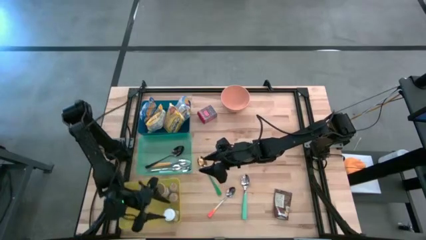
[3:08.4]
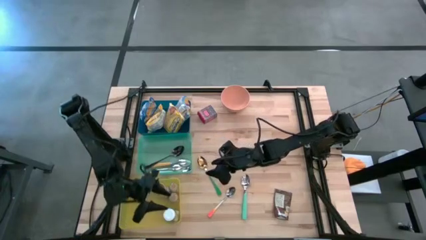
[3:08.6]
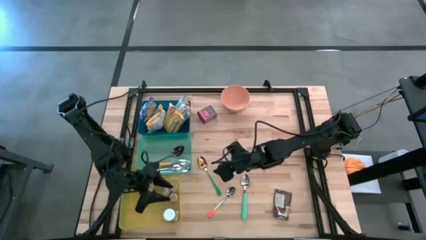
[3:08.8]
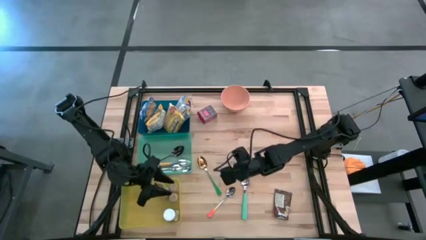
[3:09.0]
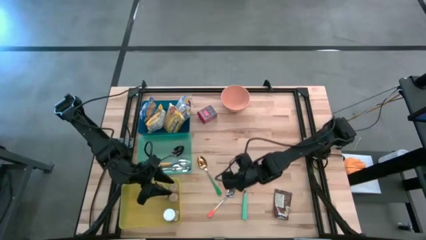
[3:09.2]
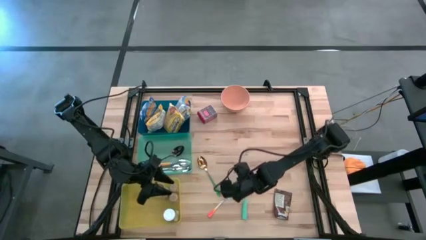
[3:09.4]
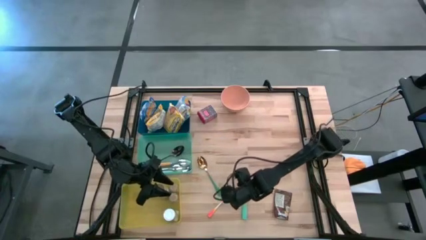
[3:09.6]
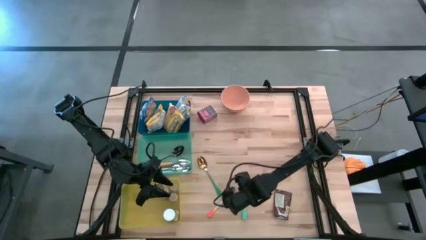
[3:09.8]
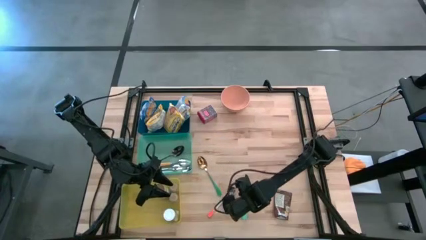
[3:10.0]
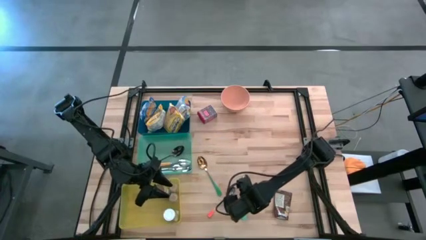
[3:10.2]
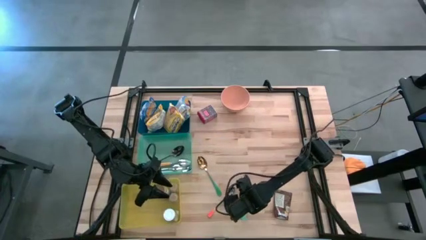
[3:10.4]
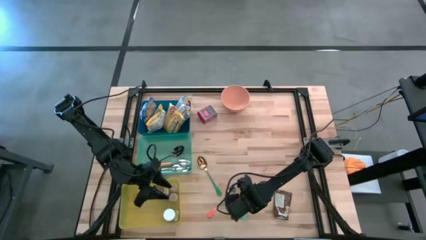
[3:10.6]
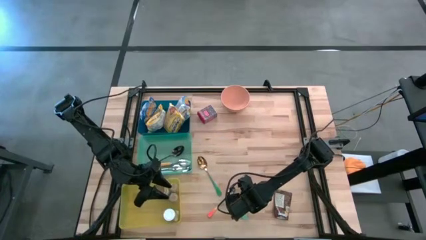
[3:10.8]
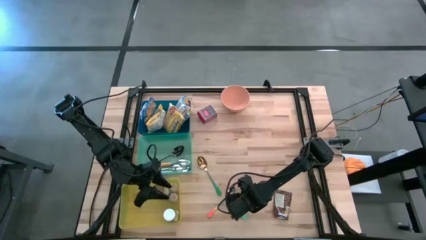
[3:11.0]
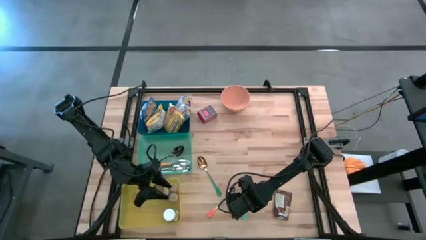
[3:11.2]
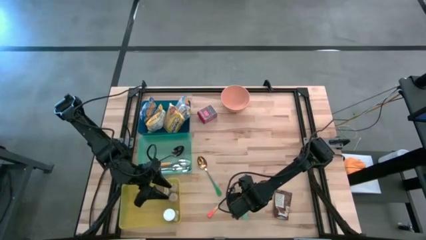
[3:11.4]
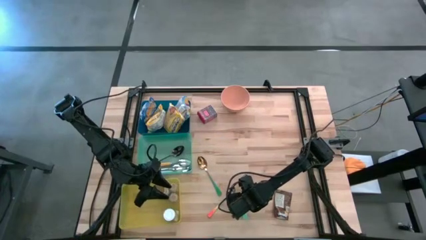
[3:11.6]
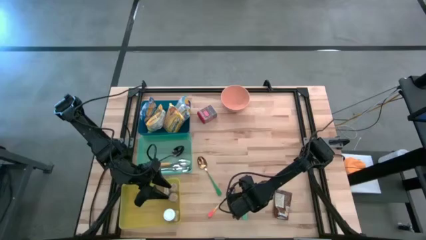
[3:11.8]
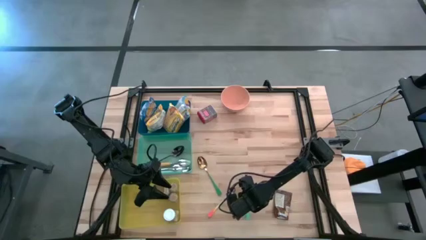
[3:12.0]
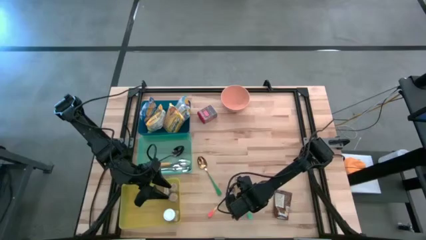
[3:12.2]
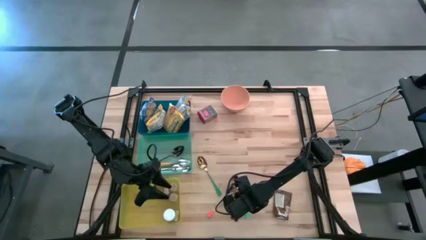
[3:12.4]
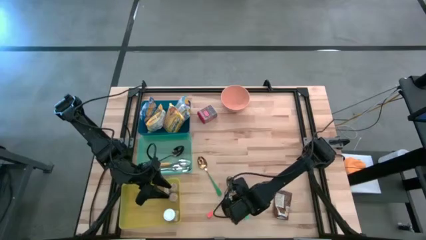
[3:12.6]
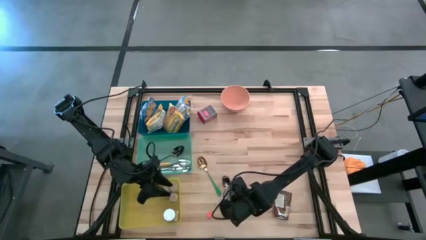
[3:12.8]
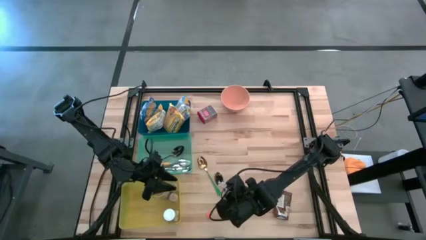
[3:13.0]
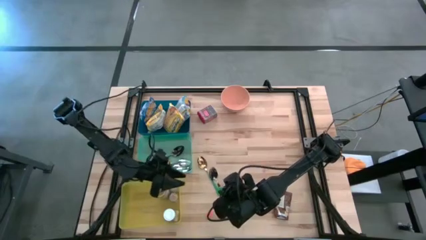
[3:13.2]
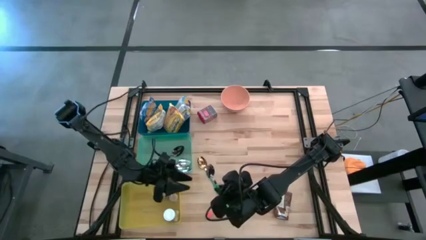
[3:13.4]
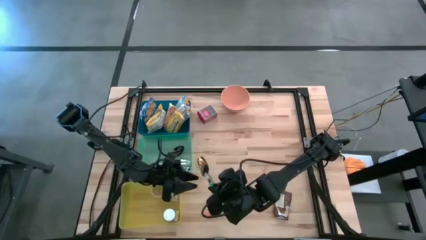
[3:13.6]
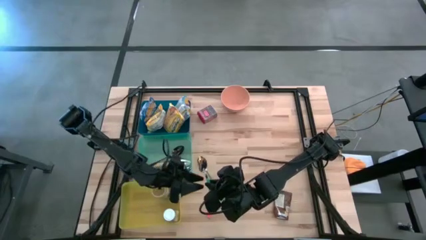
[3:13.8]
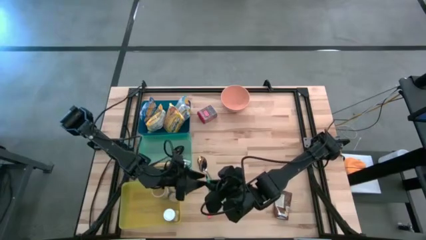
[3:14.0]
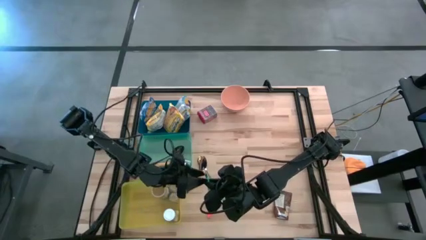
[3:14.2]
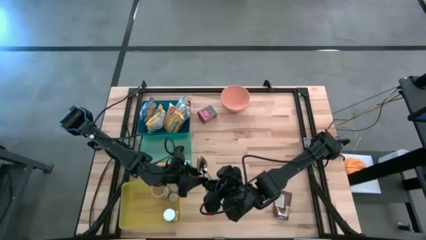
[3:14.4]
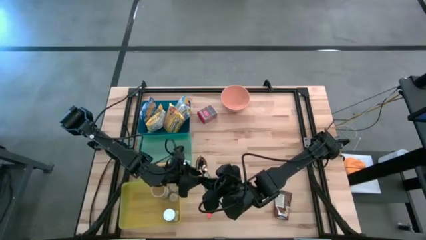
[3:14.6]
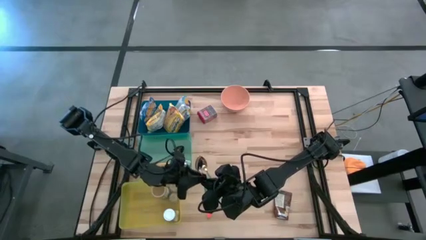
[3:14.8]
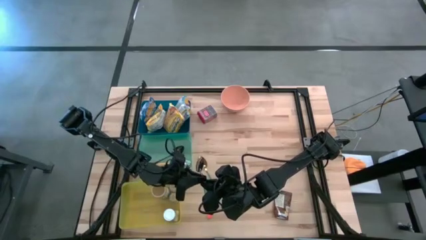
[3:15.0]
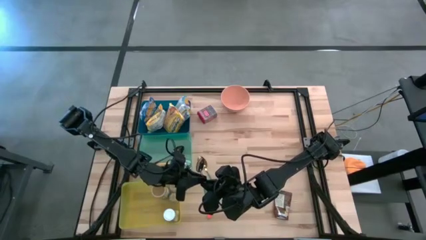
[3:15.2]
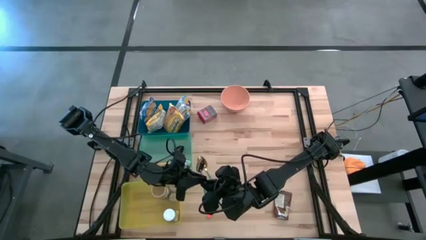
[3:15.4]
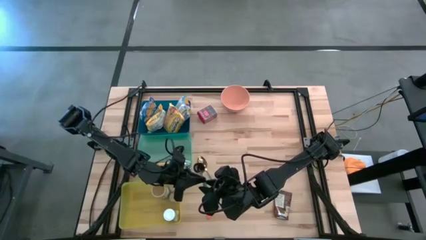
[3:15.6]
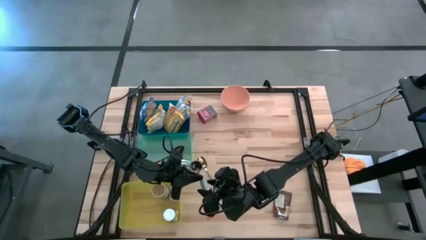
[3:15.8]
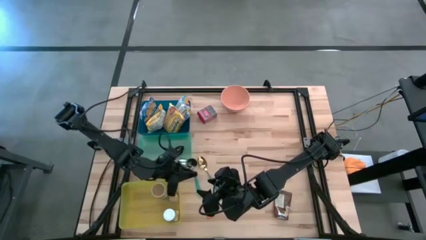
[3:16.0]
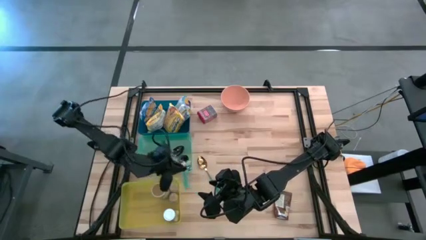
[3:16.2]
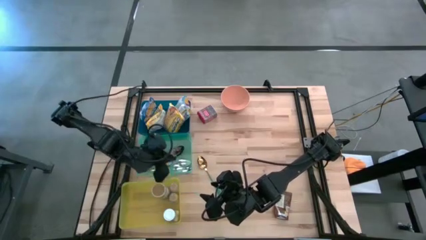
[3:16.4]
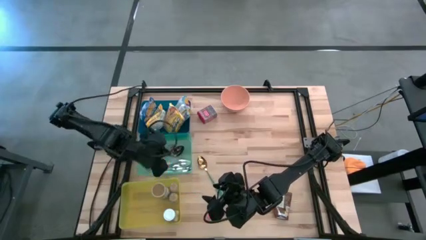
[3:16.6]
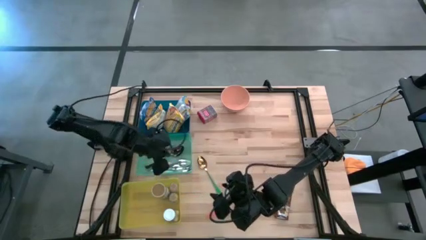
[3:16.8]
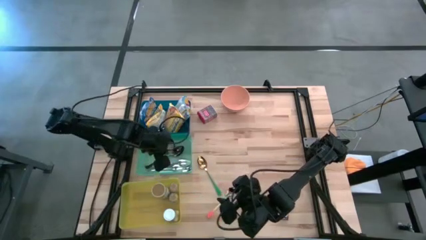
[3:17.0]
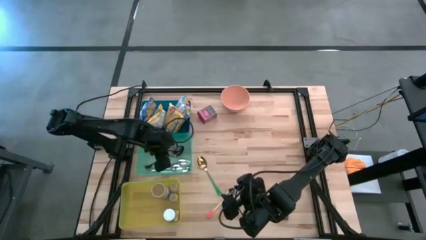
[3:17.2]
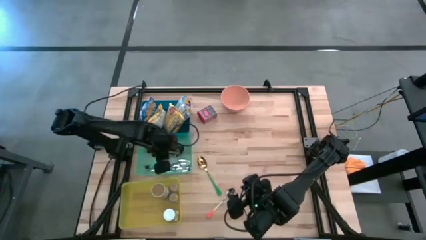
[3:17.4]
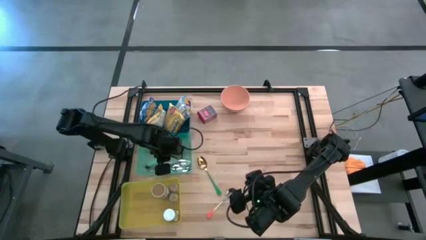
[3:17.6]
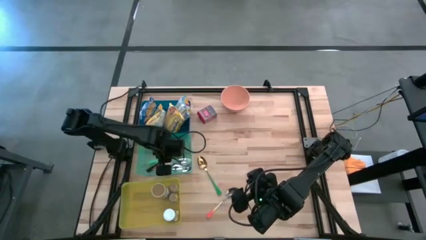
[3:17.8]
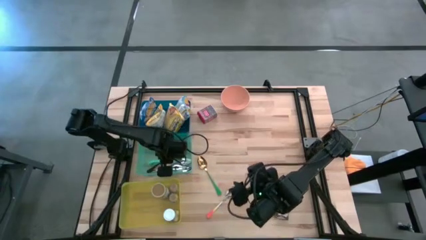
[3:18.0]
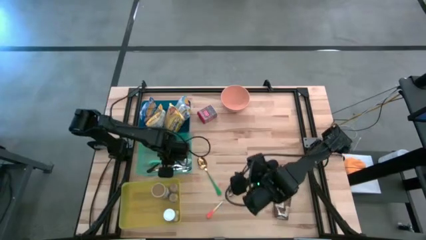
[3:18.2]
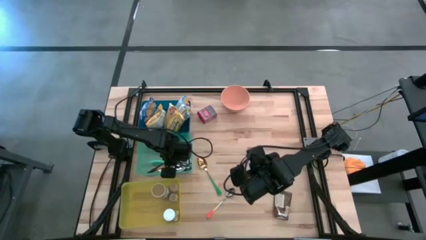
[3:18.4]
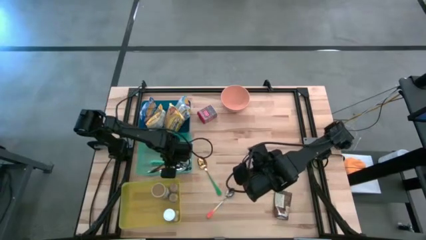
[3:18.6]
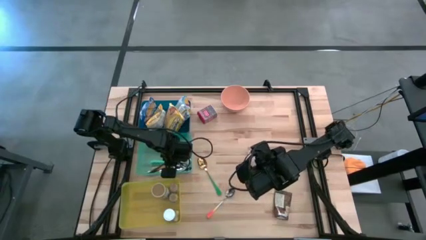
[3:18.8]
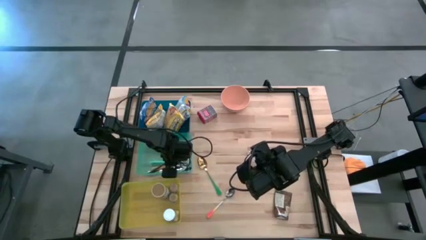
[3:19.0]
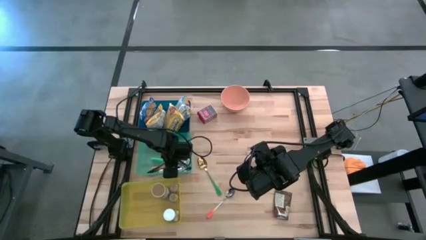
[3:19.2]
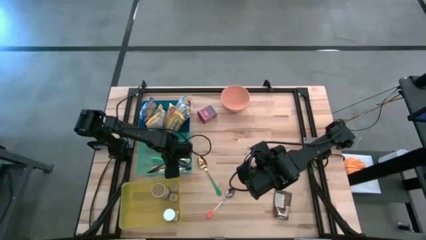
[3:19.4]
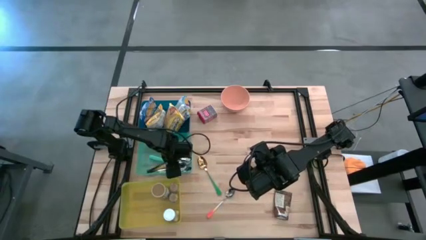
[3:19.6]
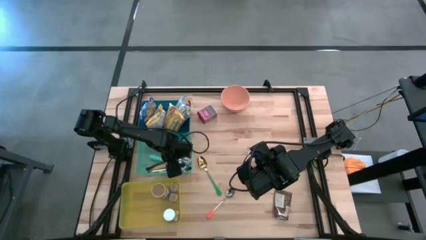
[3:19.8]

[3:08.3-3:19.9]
Put the light blue spoon into the light blue bin
